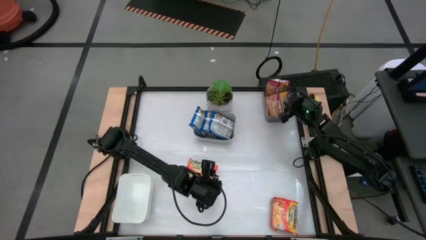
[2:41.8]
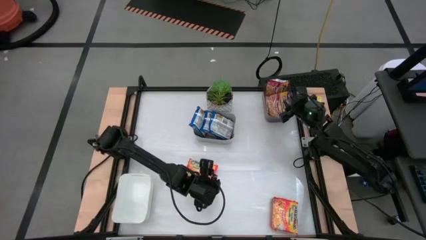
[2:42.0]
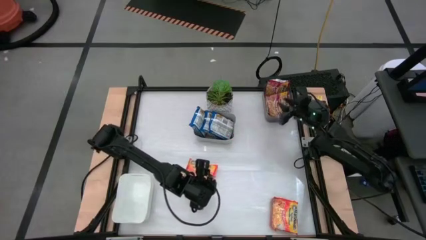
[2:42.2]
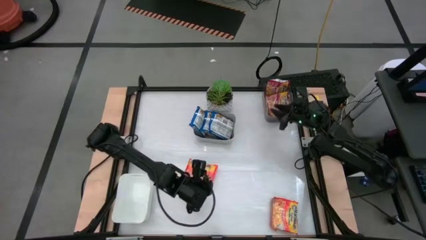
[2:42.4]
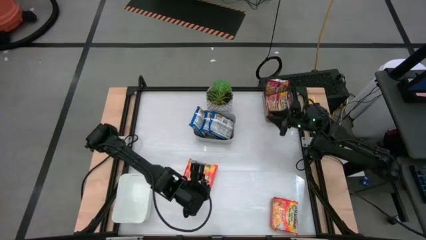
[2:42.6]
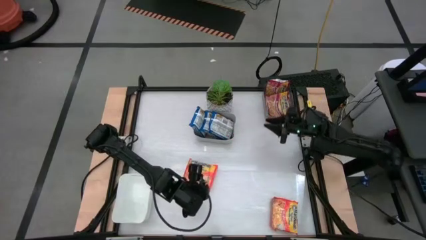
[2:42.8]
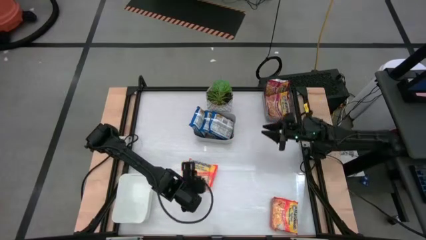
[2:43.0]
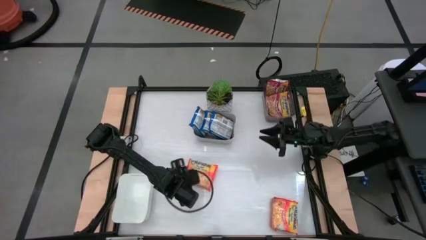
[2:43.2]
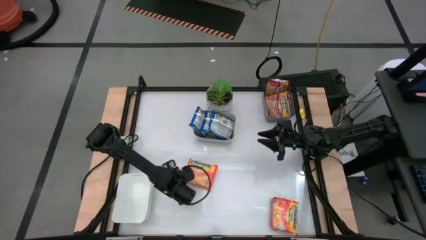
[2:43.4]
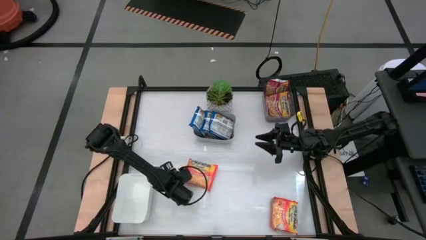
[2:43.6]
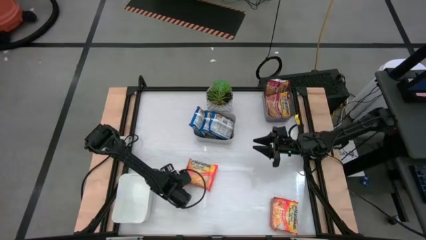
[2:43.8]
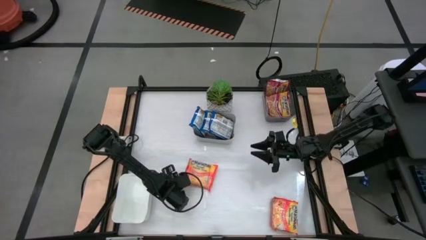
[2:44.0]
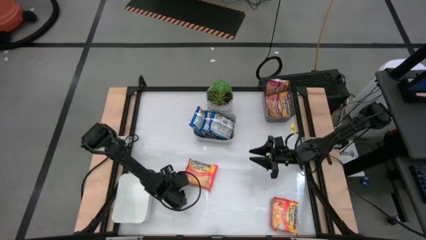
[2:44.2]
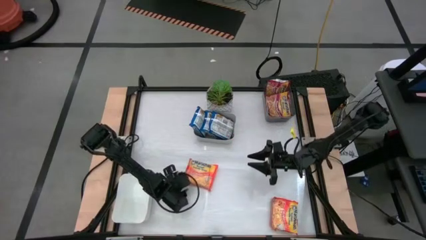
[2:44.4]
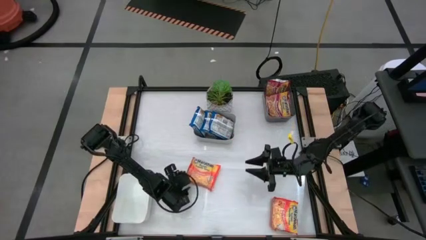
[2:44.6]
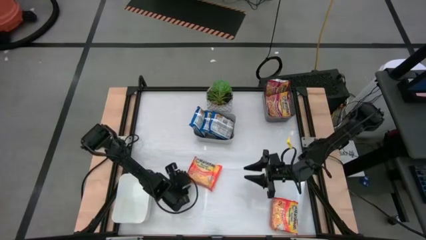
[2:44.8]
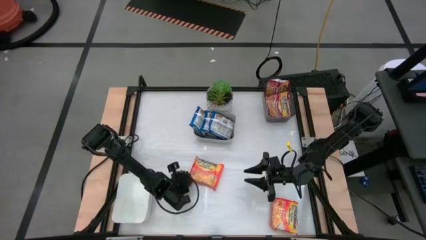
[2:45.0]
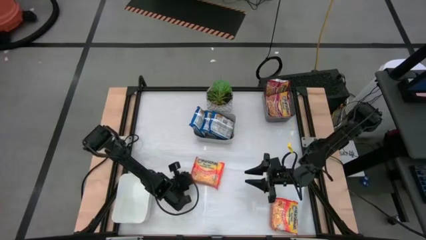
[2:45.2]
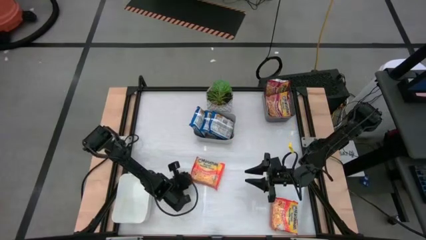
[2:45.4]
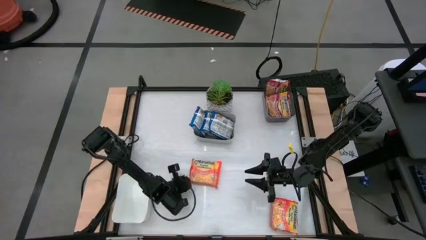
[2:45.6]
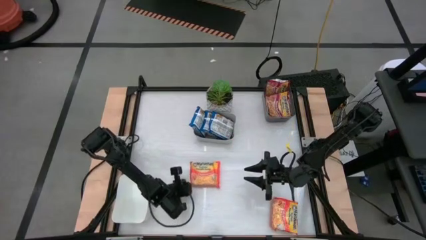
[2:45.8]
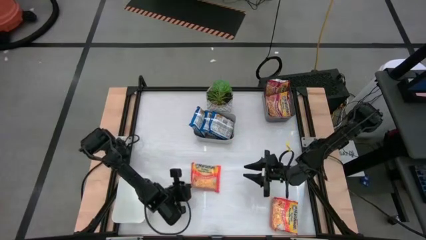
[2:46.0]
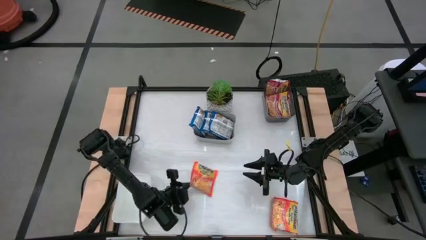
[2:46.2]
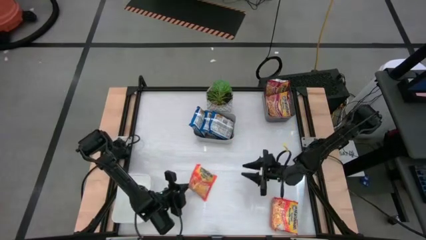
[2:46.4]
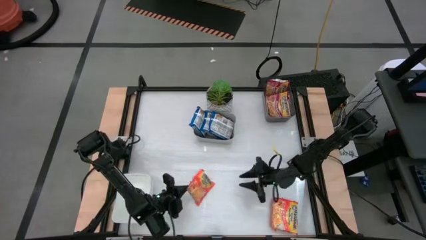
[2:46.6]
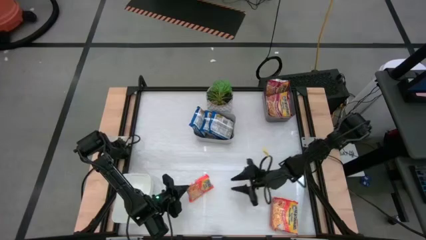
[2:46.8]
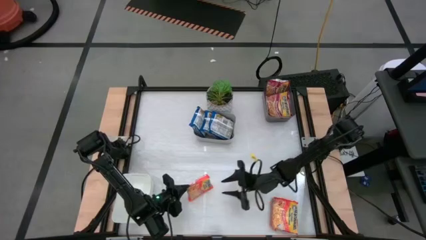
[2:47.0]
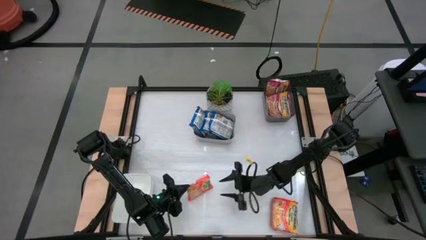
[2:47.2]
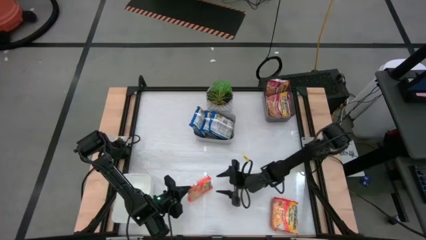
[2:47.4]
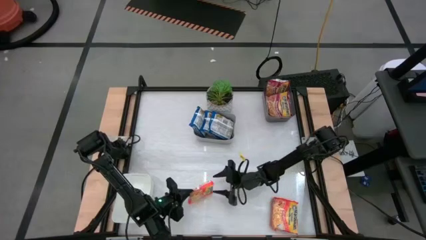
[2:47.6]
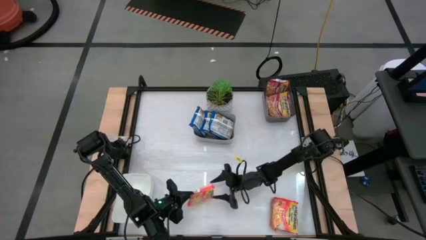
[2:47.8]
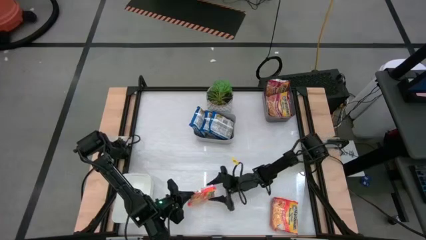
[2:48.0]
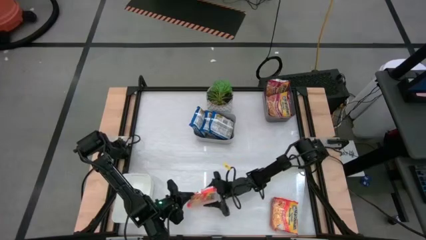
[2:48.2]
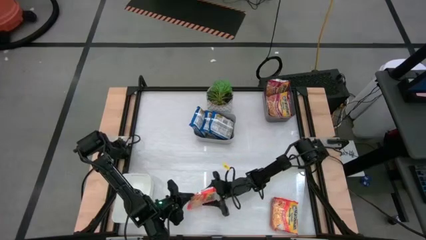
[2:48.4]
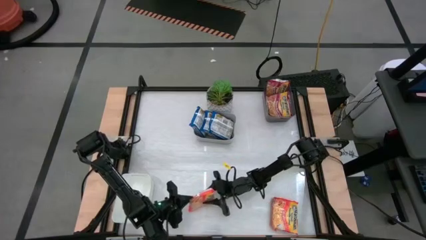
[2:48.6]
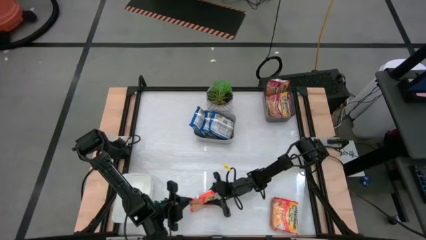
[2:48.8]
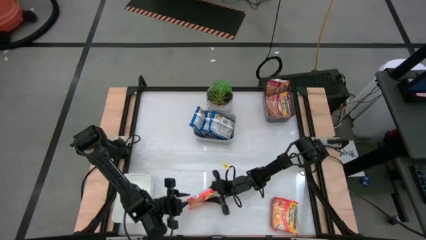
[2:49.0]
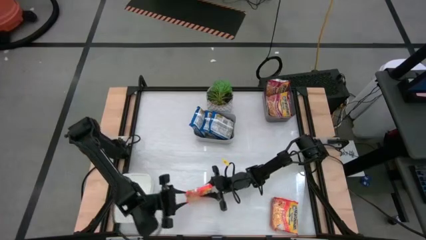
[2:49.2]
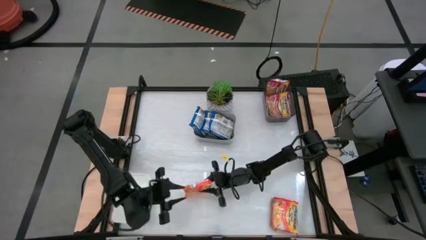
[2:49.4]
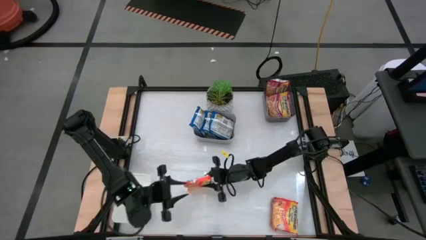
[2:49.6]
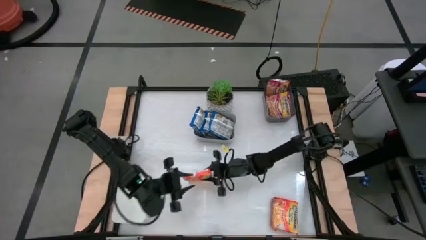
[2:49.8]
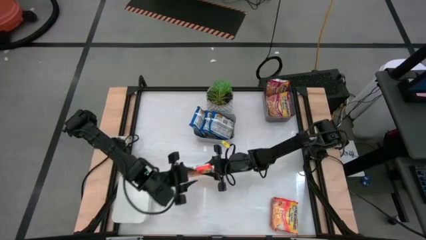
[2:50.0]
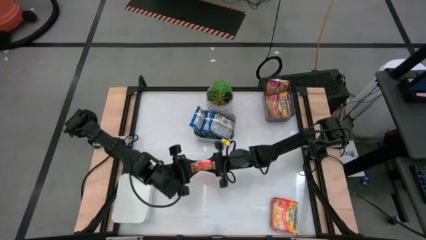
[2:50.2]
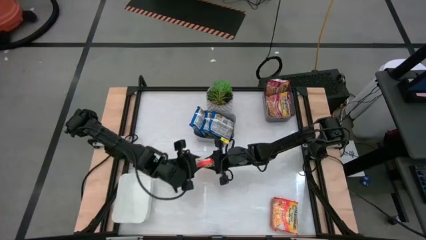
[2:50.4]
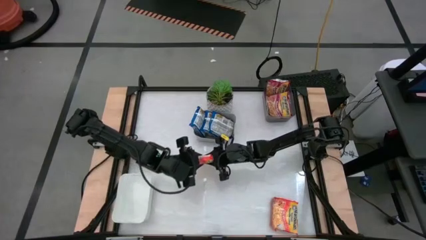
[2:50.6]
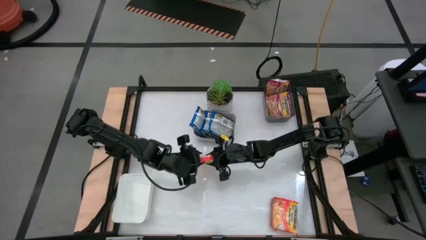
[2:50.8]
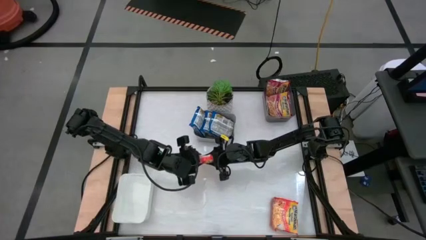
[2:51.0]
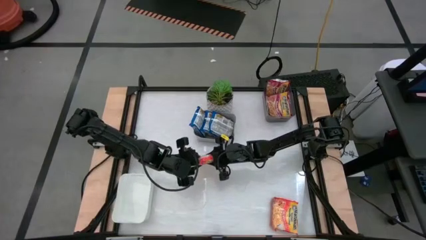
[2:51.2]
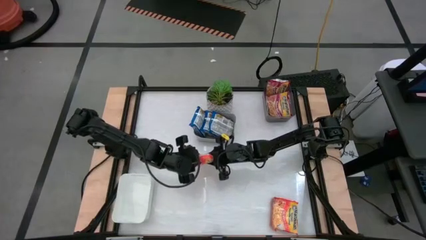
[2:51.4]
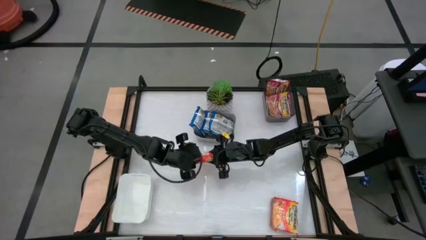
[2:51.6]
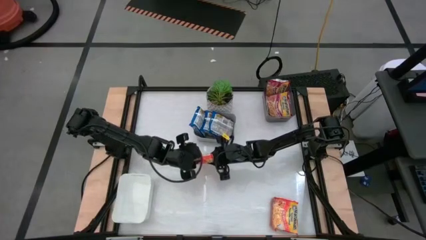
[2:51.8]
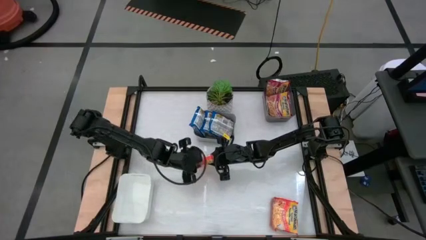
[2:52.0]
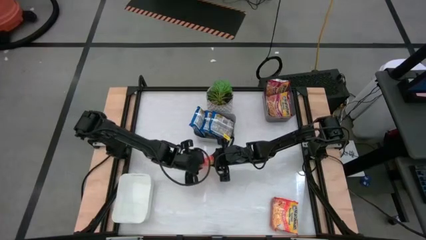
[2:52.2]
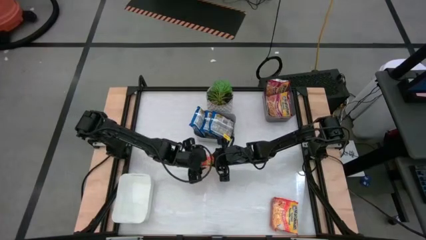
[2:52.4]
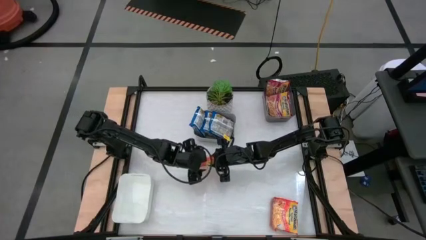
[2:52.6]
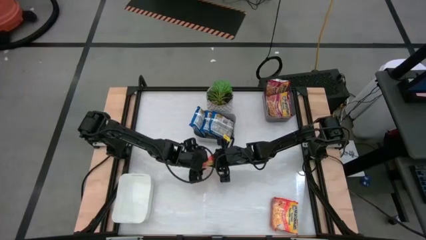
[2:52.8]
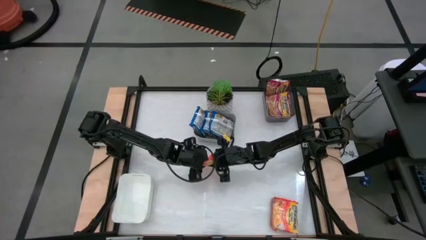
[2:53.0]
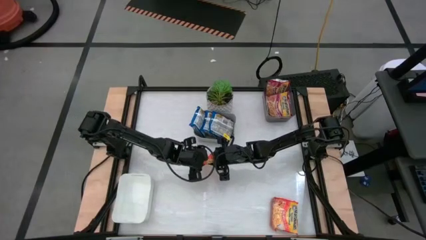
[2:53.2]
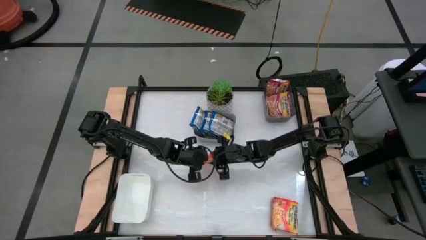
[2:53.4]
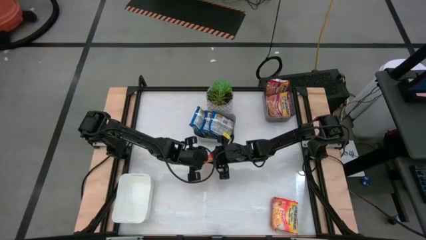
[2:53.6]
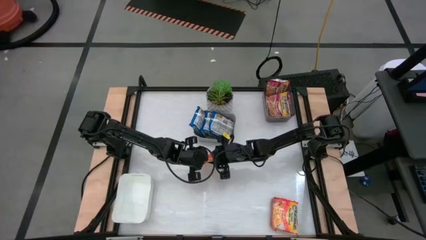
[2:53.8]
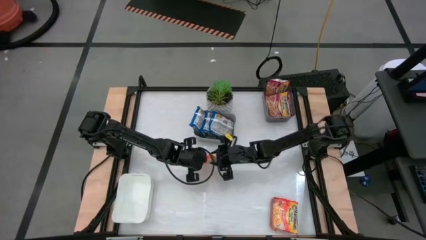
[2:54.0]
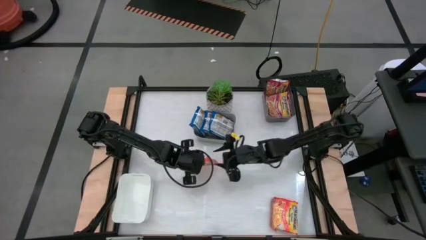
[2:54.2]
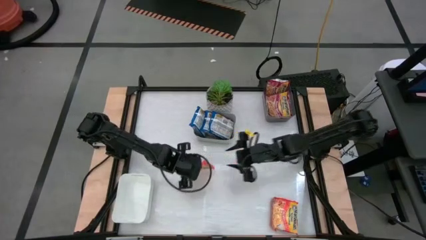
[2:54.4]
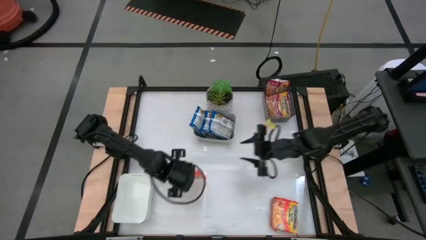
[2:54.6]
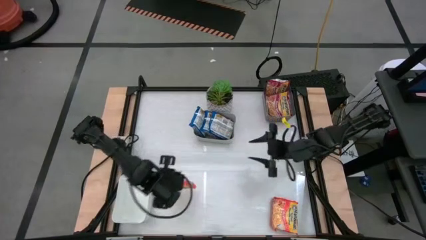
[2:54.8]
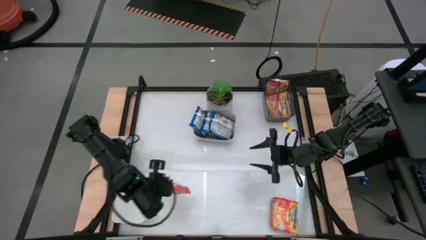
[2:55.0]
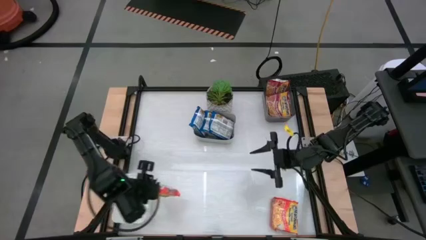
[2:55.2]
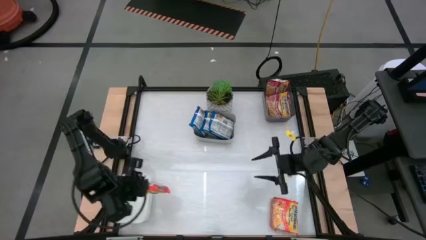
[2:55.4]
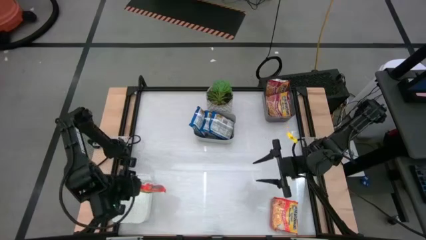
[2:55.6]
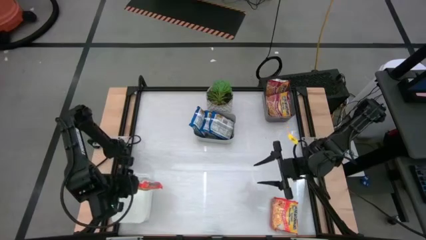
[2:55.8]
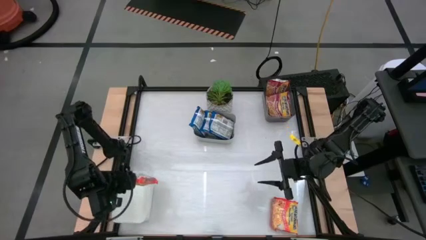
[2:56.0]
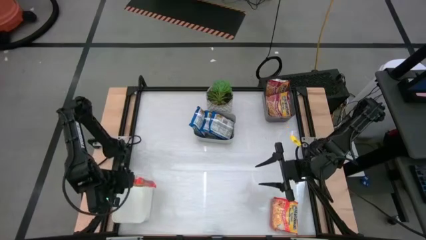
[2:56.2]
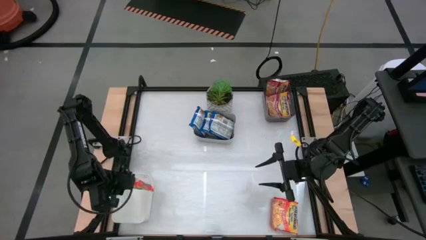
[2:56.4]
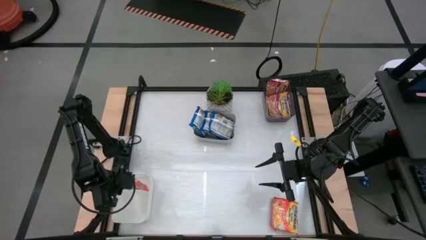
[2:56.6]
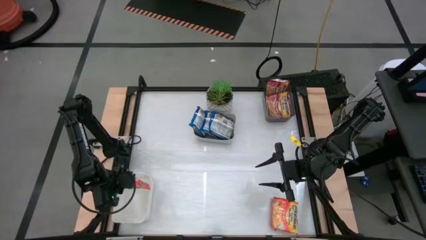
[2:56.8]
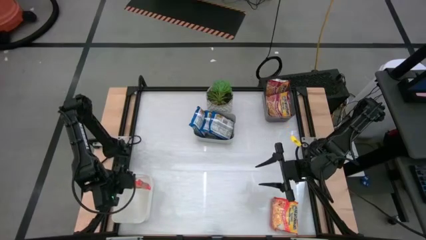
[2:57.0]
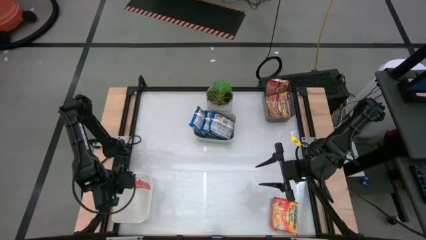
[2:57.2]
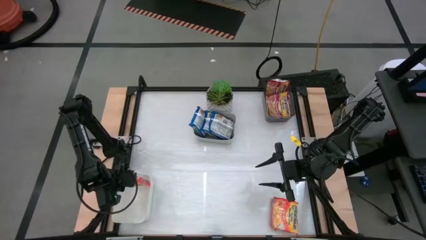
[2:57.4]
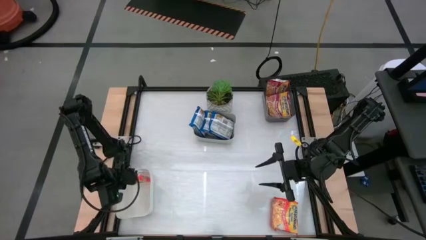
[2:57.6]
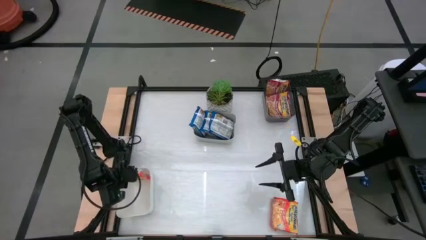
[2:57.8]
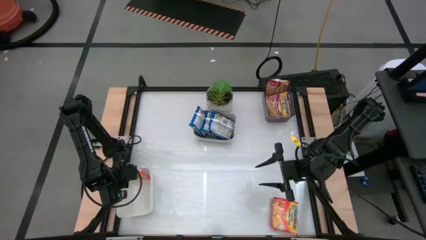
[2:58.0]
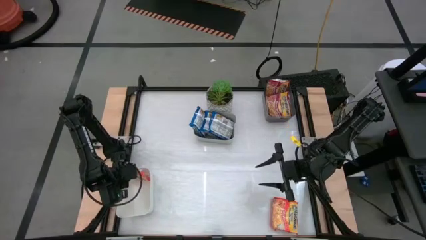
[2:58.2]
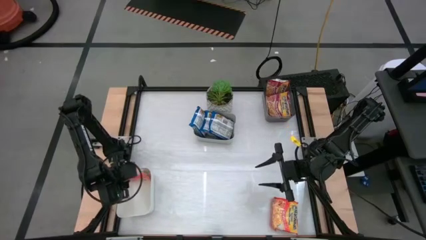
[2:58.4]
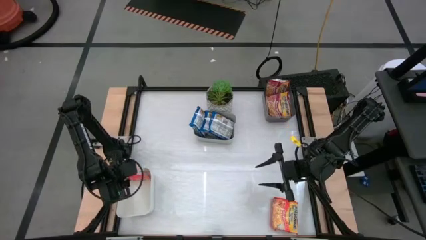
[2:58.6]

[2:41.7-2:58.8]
Task: Sort Maruchan noodles
Put the left orange noodle pack into the white bin
